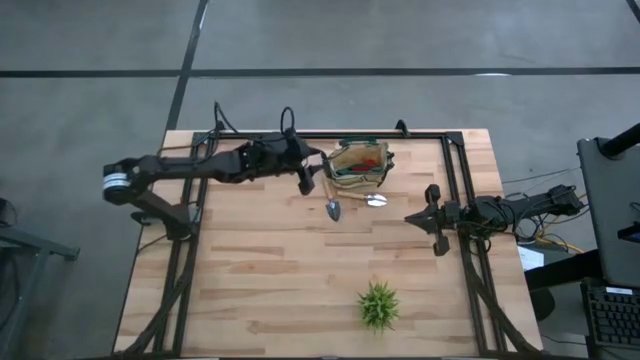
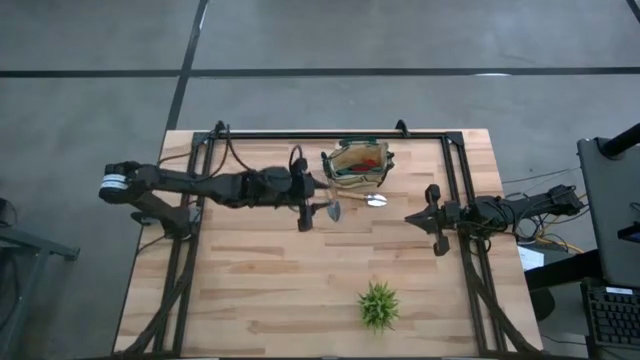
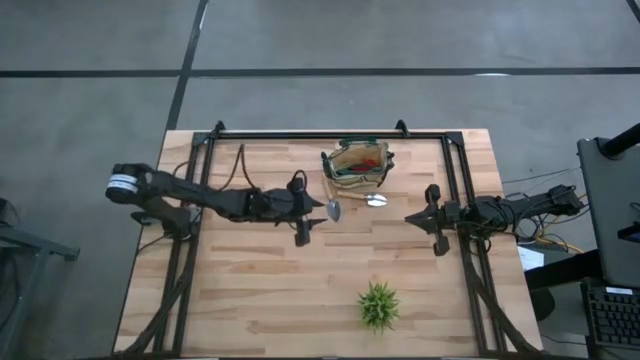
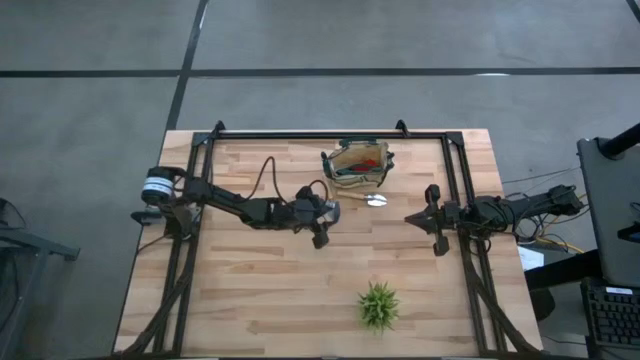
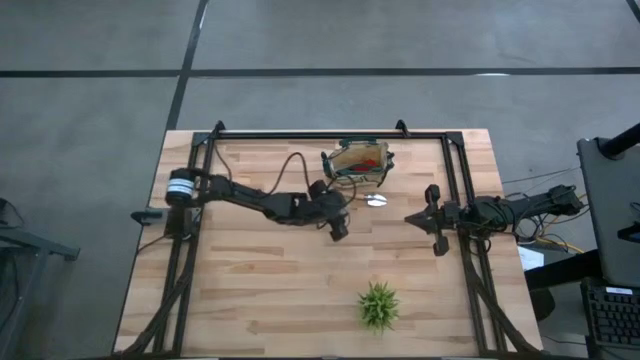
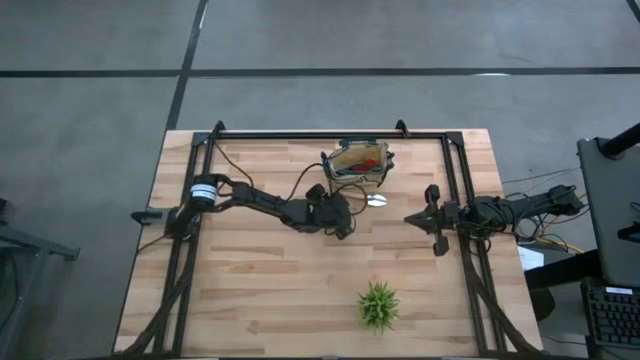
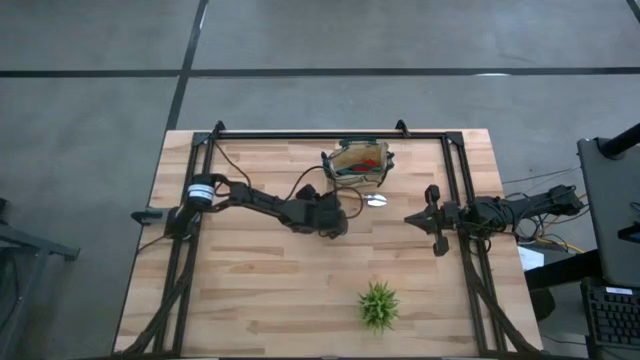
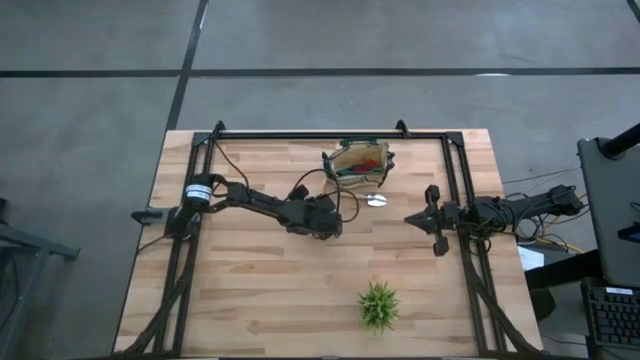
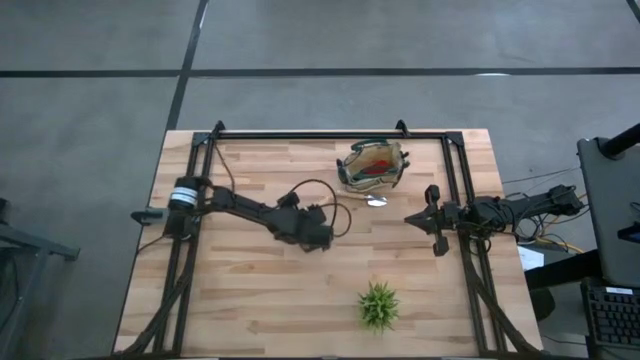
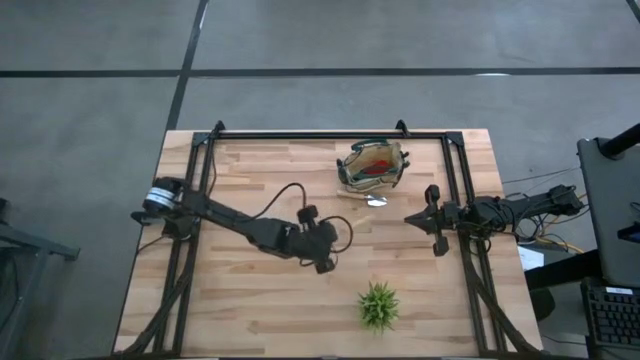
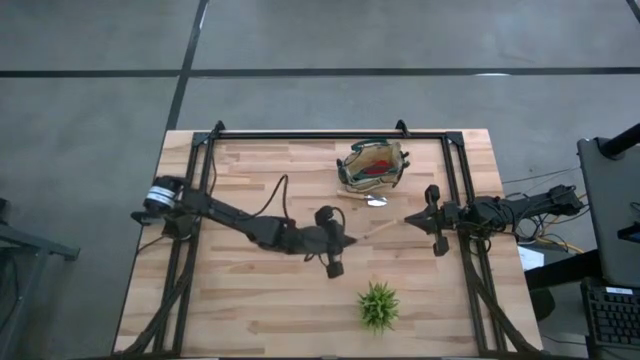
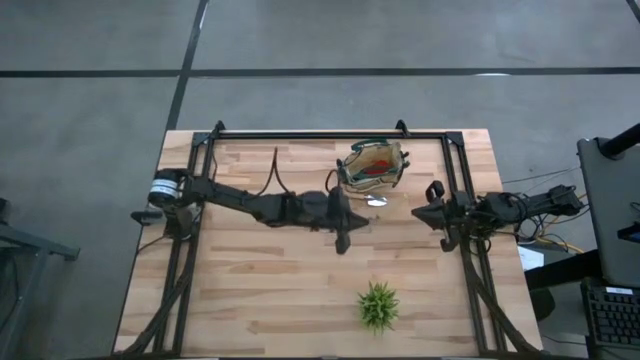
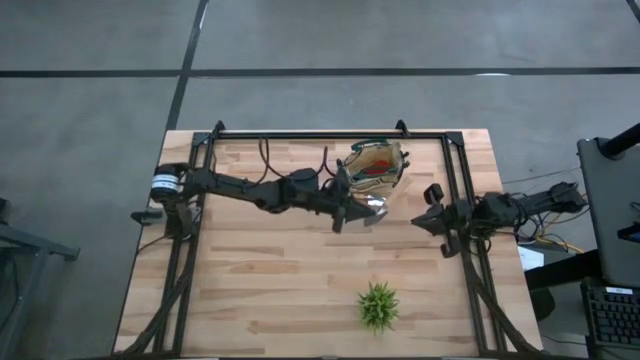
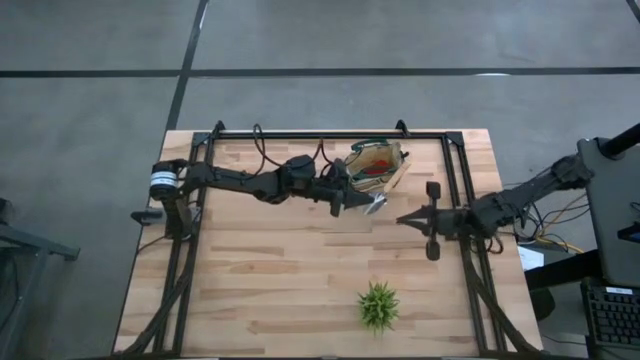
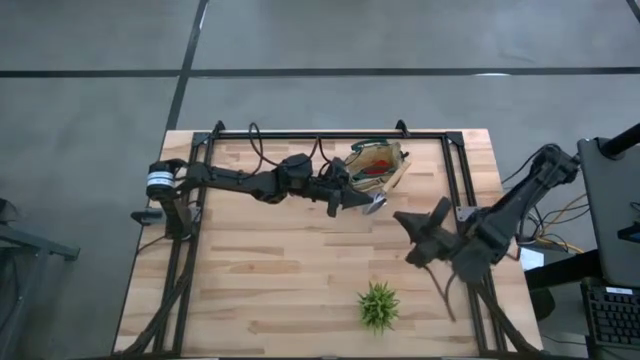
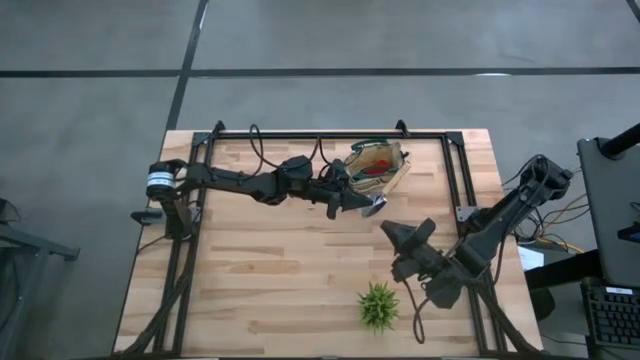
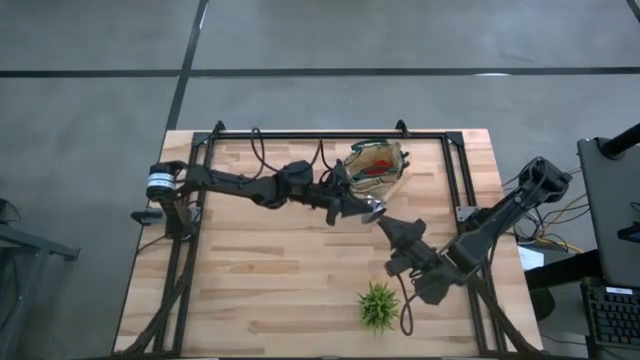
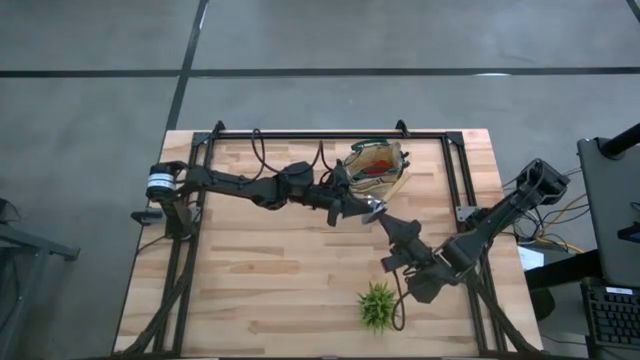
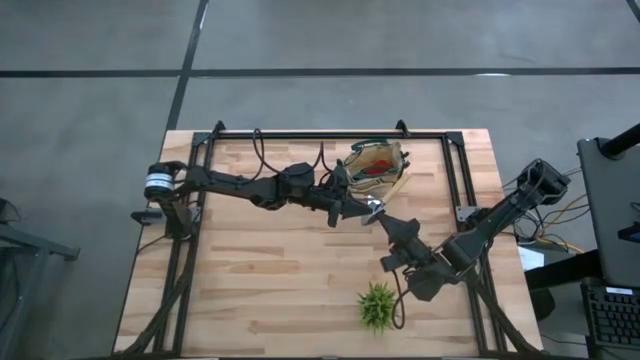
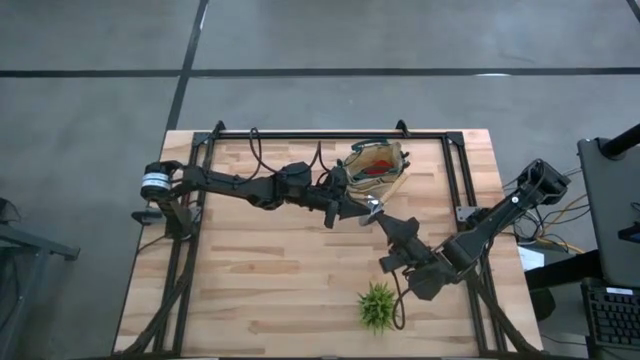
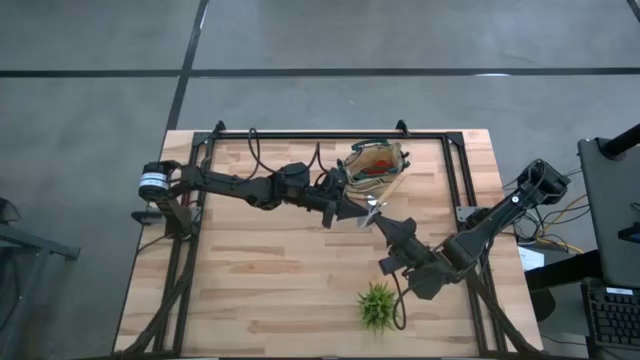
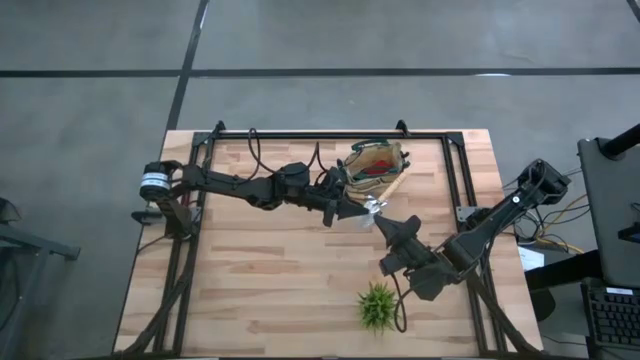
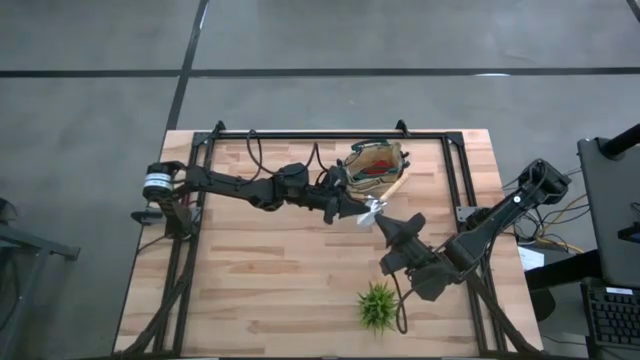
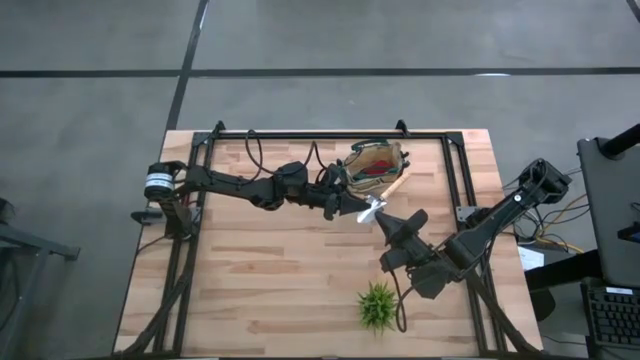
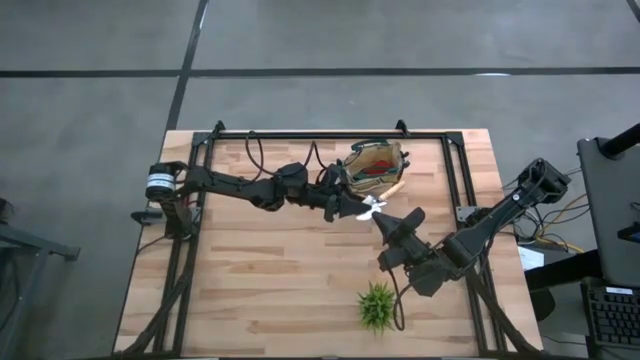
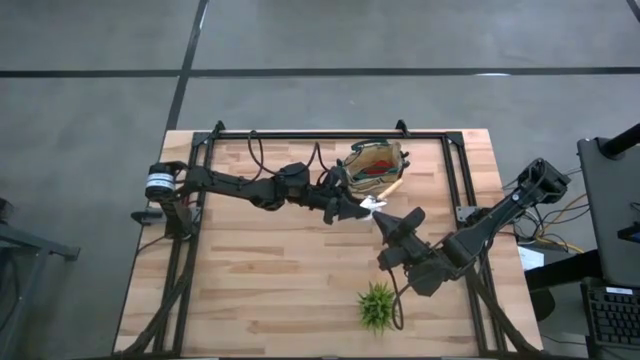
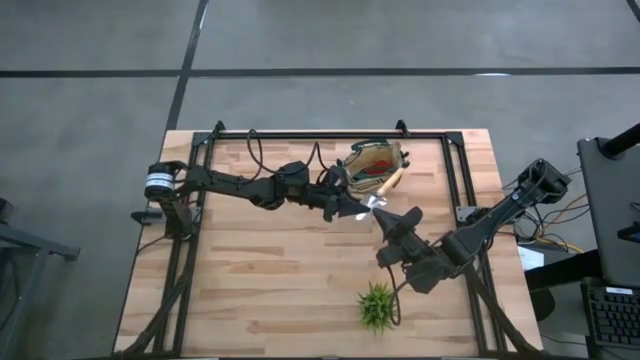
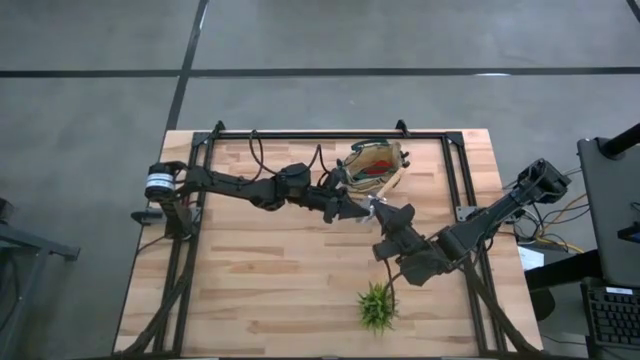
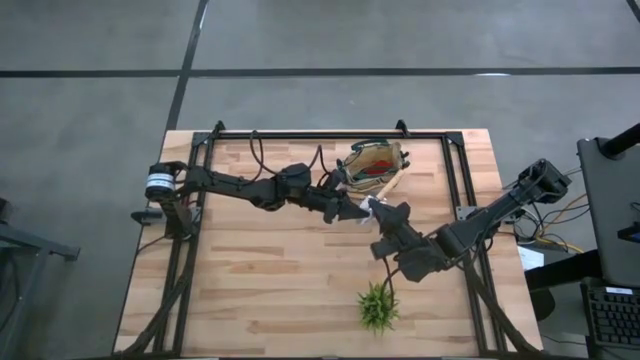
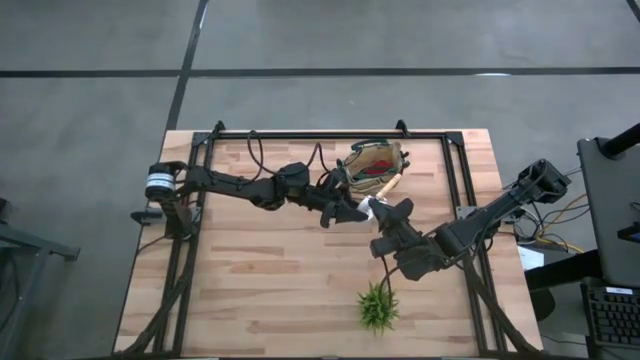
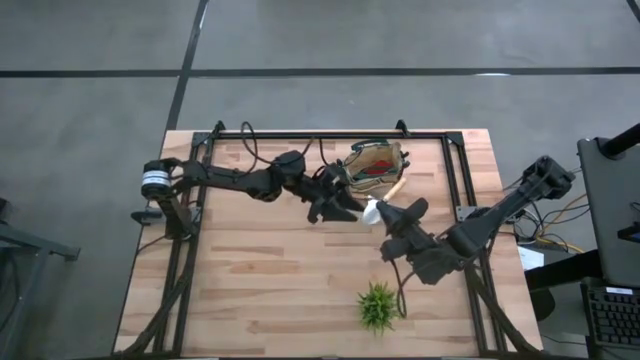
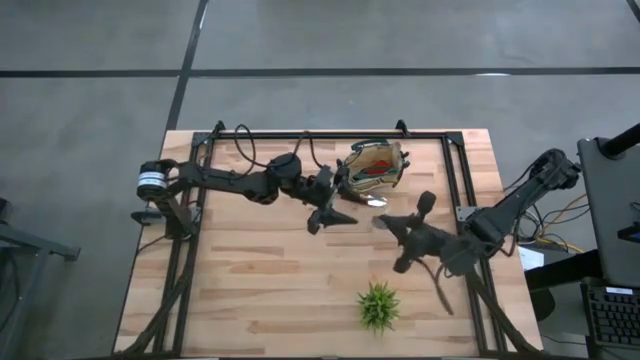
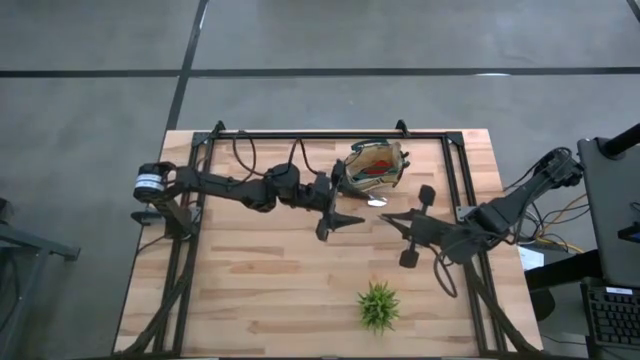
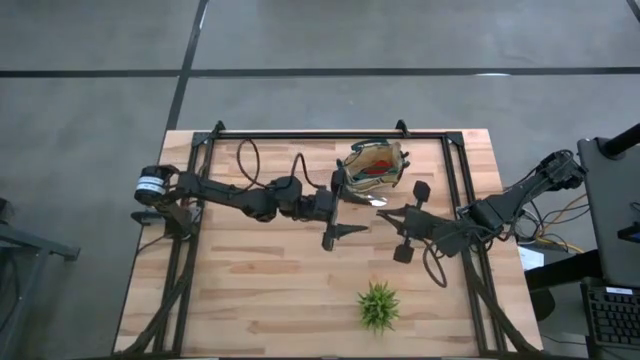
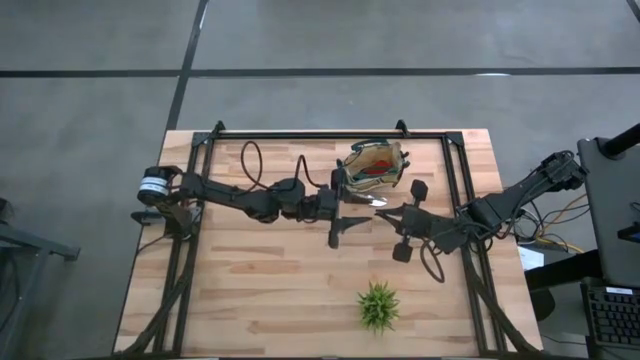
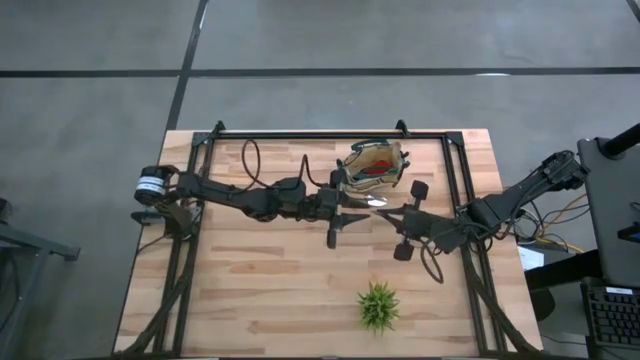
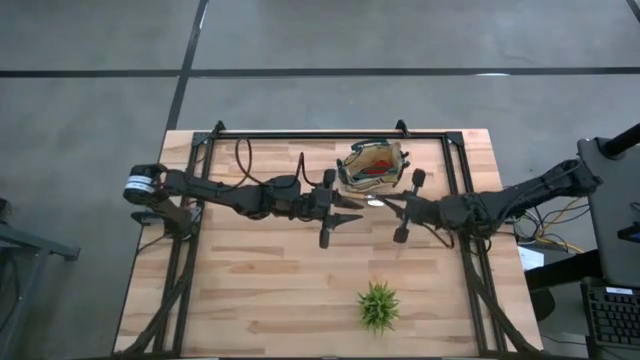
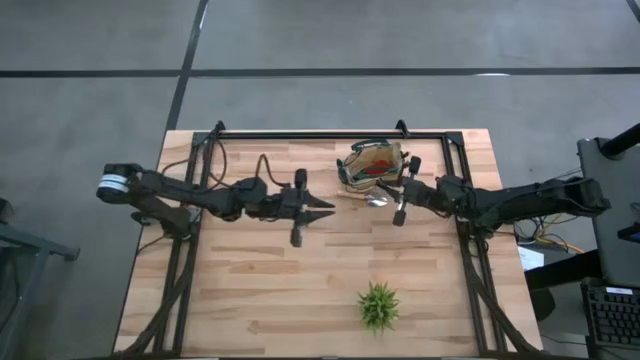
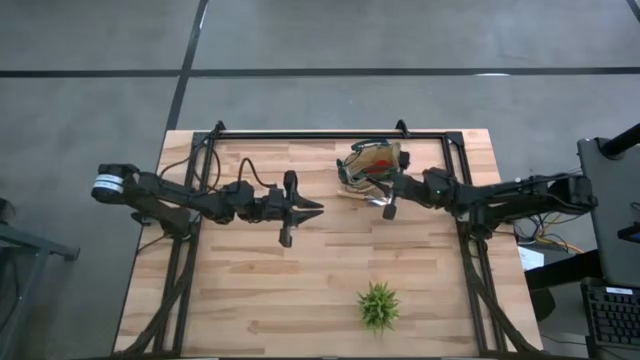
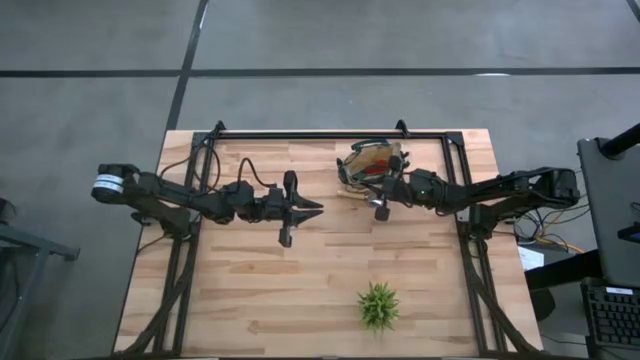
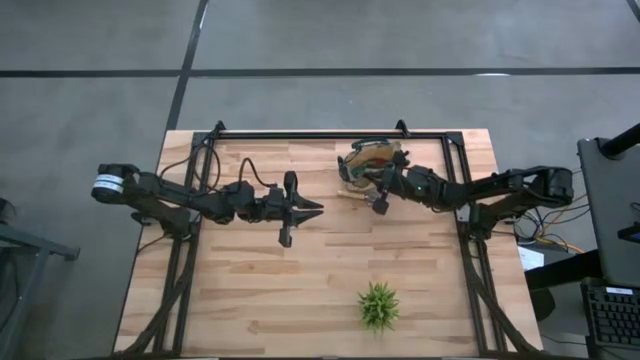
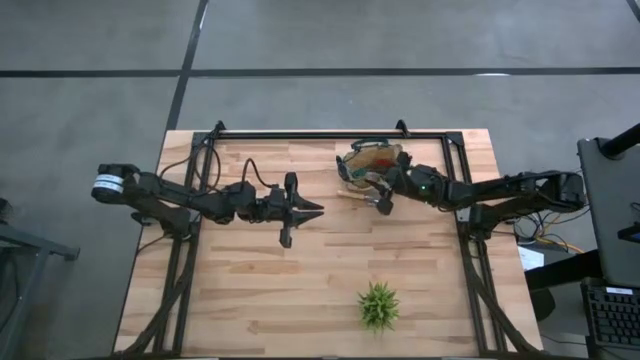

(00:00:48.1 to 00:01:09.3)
Task: Pick & Place Garden tools in Gardening bag
Put the brown trowel into the gardening bag

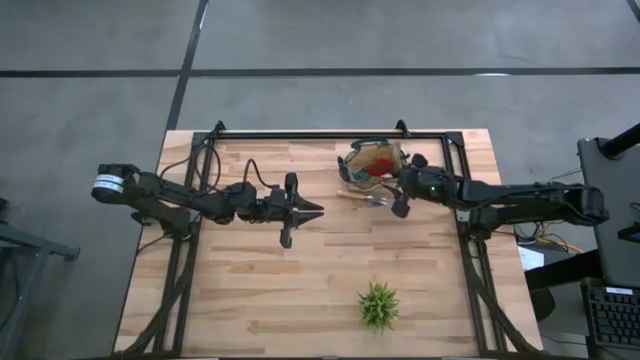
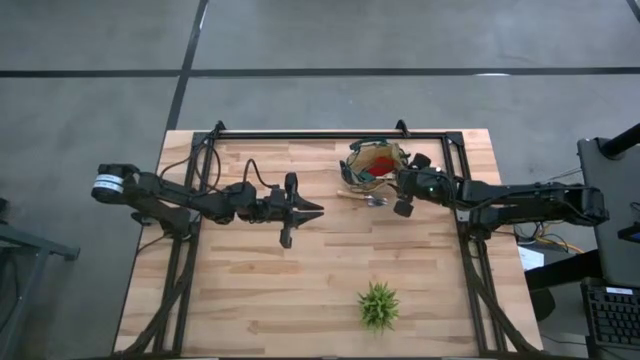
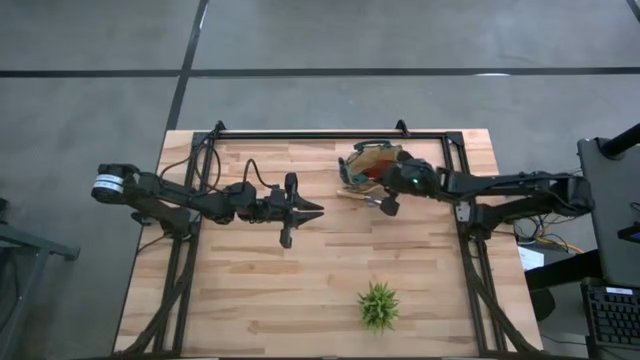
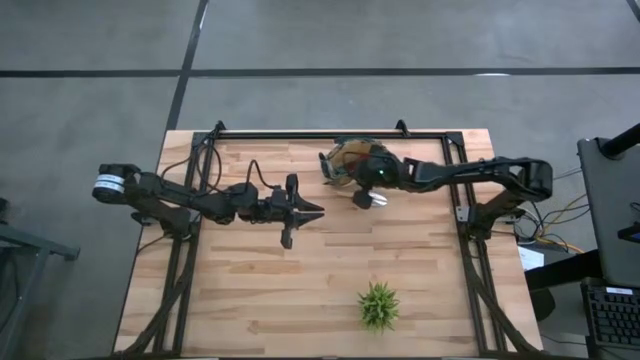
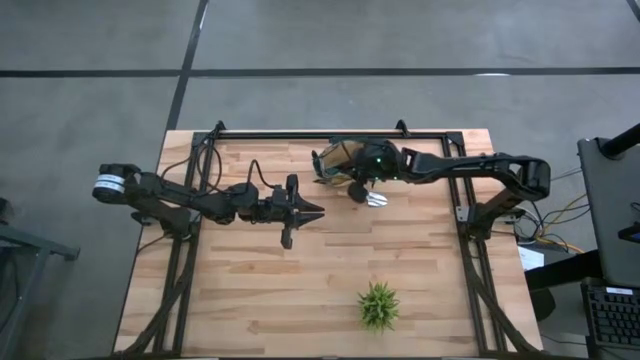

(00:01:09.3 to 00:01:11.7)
Adjust the gardening bag on the table
